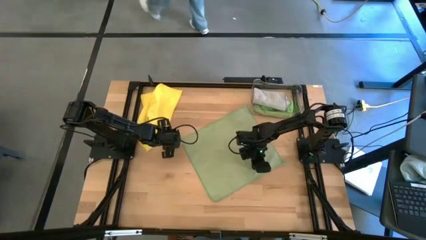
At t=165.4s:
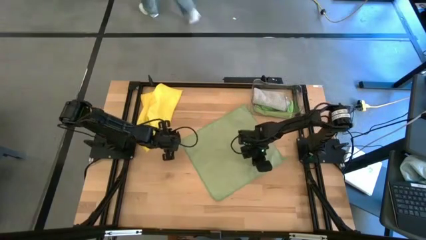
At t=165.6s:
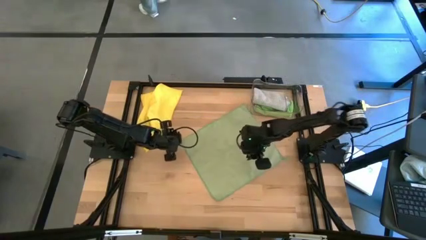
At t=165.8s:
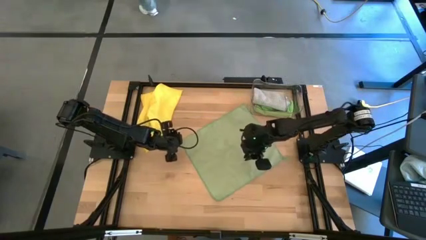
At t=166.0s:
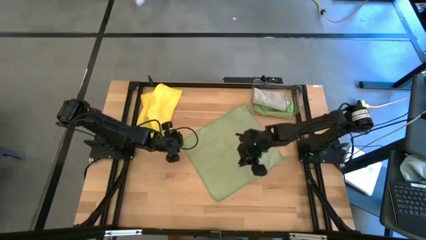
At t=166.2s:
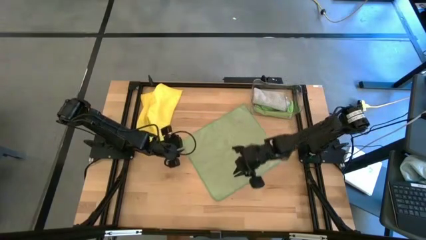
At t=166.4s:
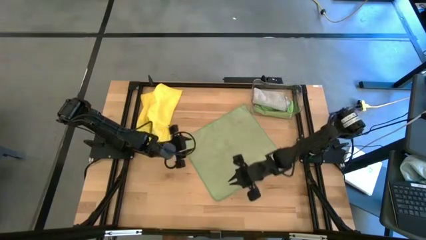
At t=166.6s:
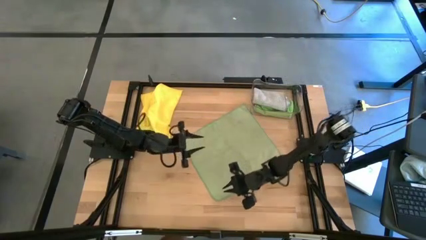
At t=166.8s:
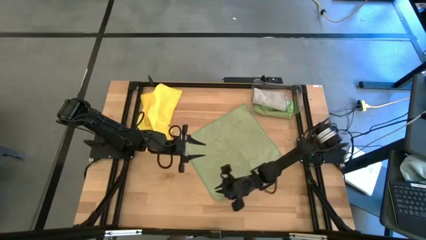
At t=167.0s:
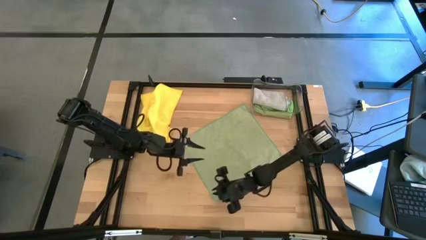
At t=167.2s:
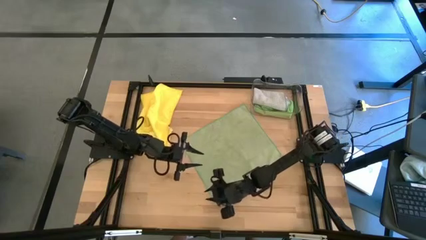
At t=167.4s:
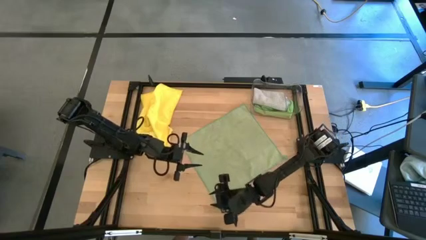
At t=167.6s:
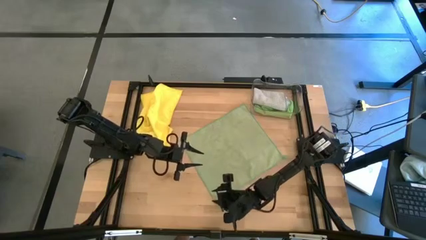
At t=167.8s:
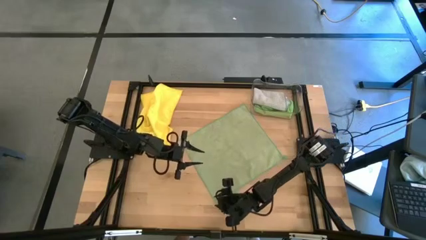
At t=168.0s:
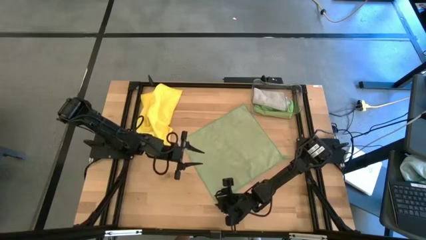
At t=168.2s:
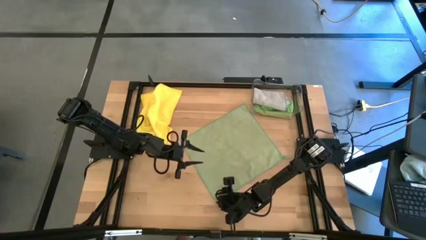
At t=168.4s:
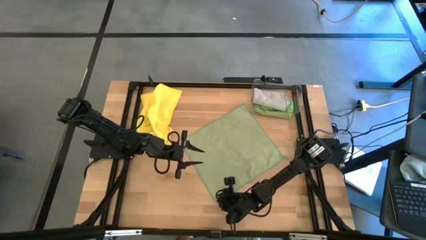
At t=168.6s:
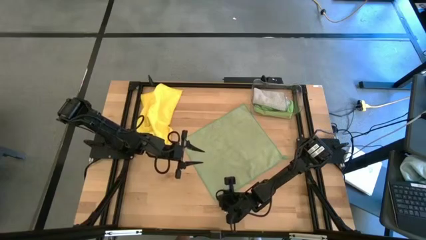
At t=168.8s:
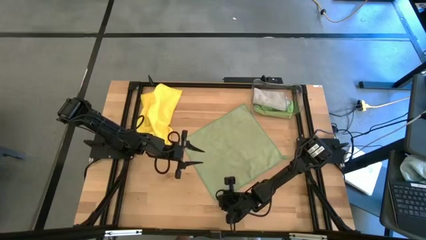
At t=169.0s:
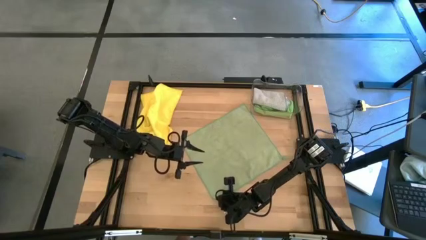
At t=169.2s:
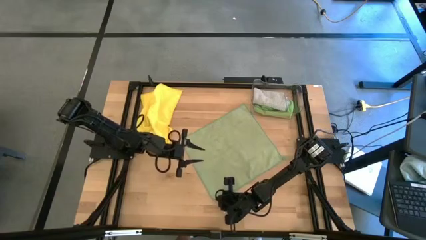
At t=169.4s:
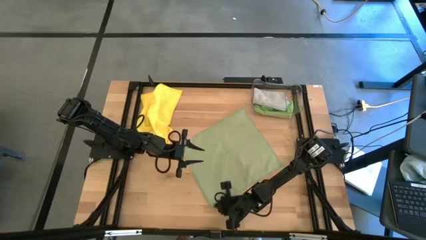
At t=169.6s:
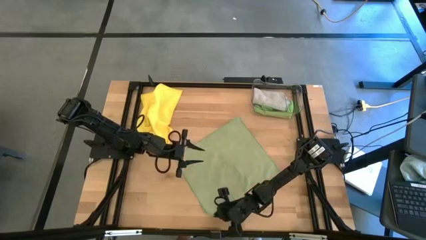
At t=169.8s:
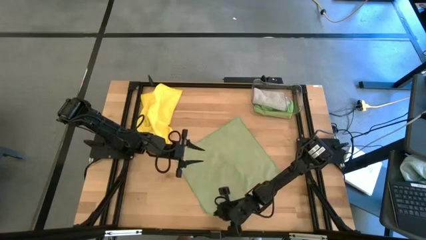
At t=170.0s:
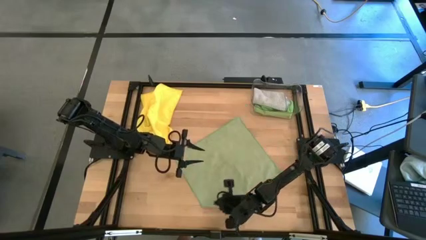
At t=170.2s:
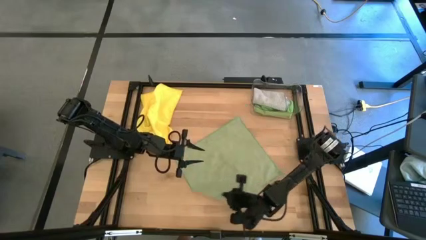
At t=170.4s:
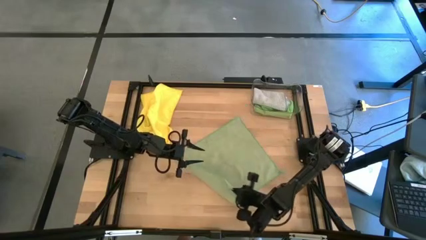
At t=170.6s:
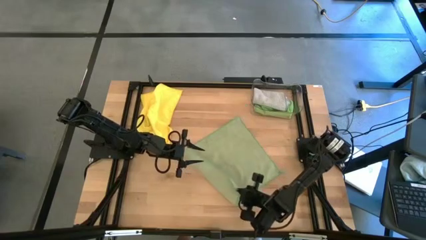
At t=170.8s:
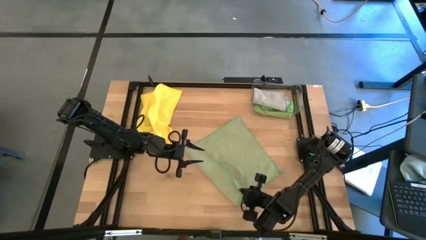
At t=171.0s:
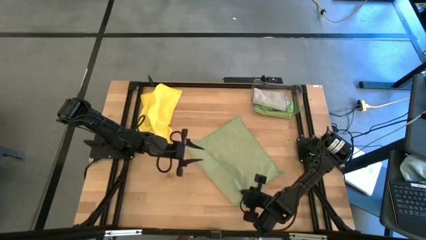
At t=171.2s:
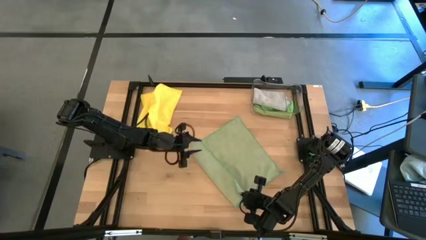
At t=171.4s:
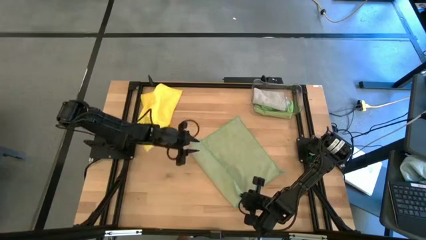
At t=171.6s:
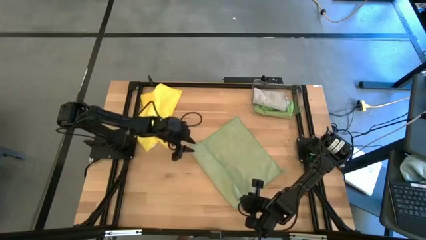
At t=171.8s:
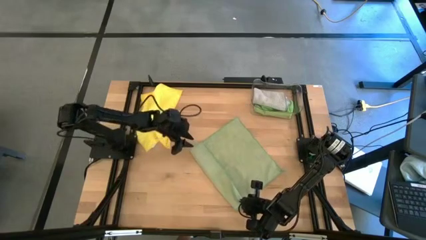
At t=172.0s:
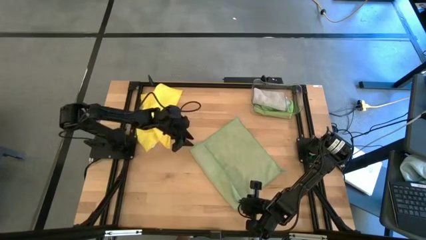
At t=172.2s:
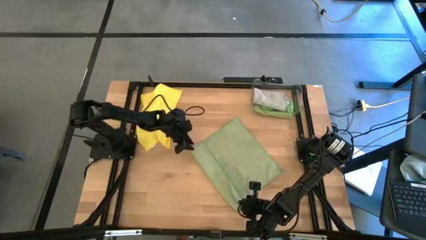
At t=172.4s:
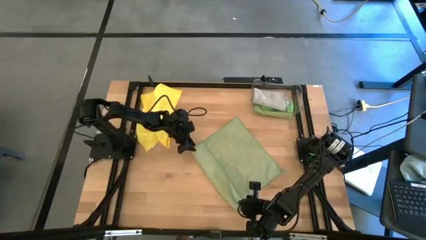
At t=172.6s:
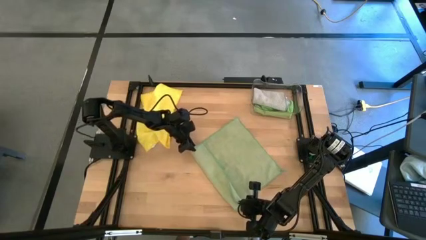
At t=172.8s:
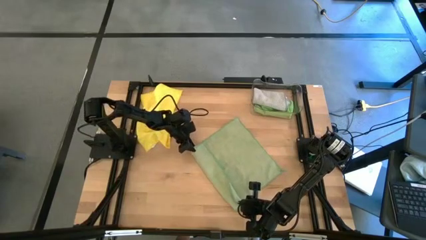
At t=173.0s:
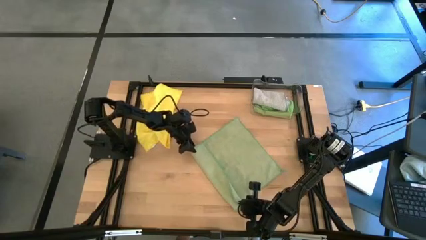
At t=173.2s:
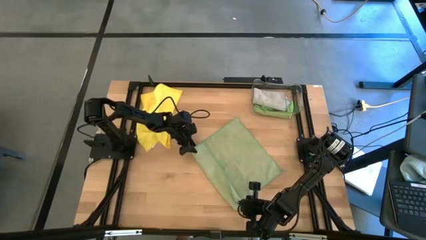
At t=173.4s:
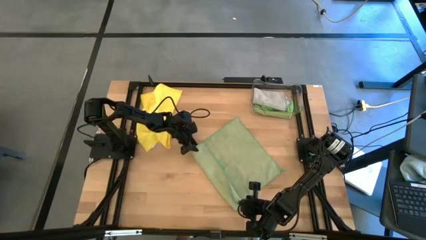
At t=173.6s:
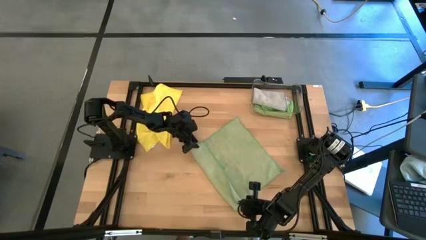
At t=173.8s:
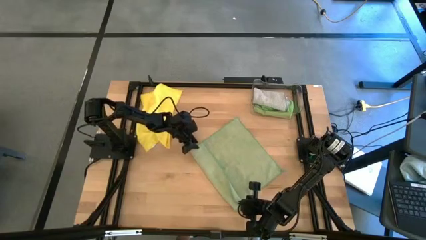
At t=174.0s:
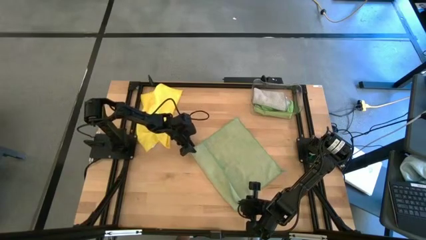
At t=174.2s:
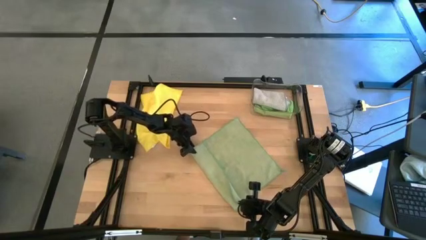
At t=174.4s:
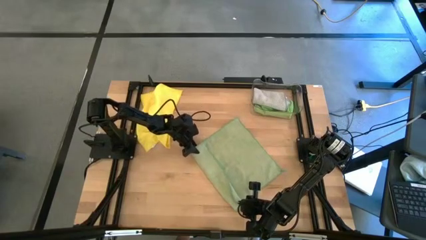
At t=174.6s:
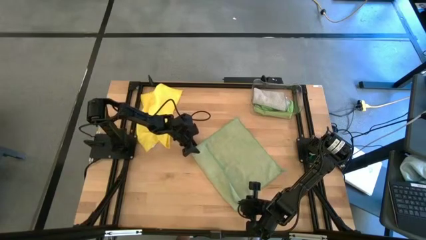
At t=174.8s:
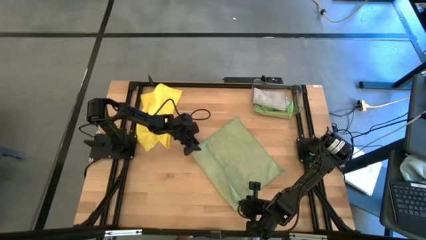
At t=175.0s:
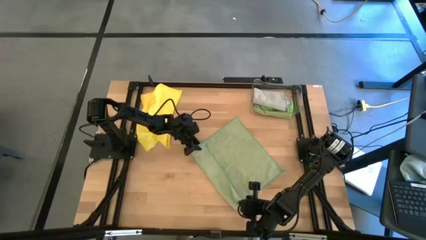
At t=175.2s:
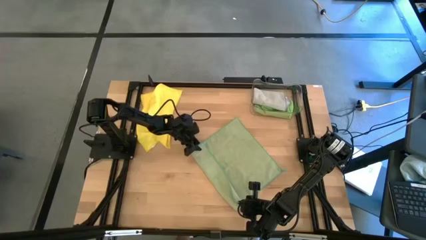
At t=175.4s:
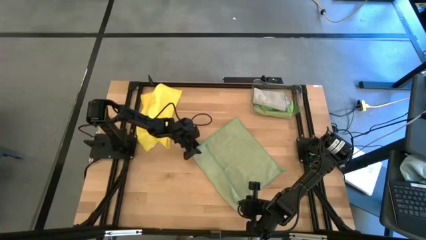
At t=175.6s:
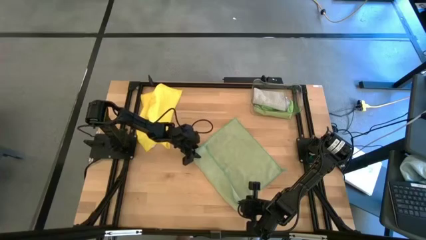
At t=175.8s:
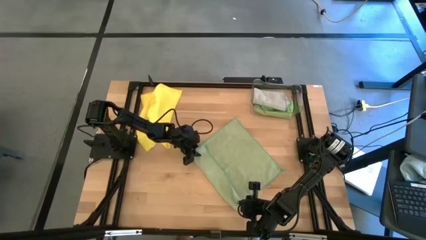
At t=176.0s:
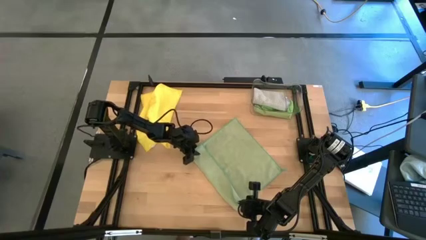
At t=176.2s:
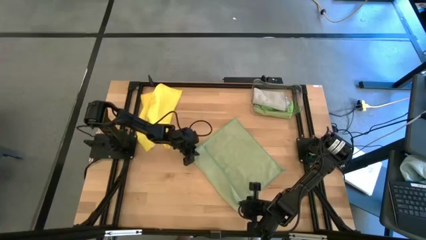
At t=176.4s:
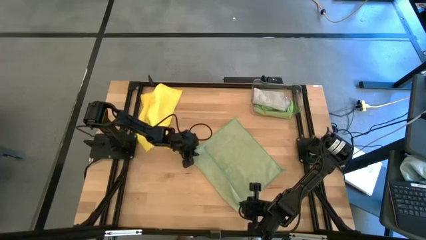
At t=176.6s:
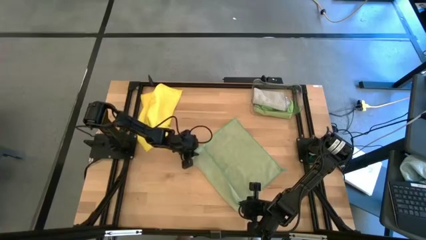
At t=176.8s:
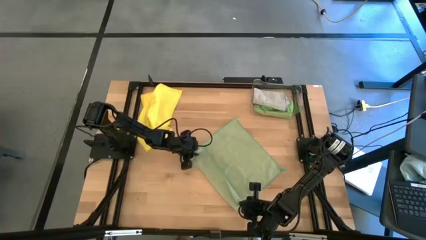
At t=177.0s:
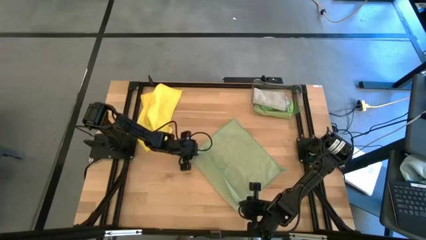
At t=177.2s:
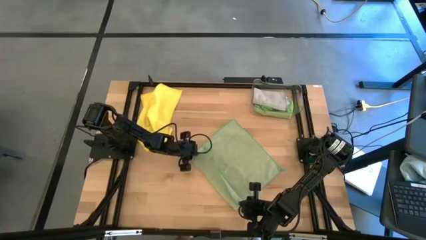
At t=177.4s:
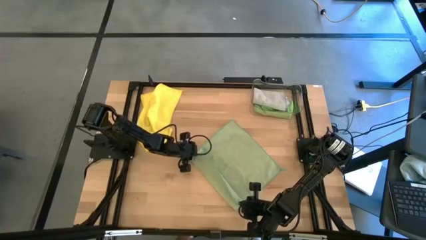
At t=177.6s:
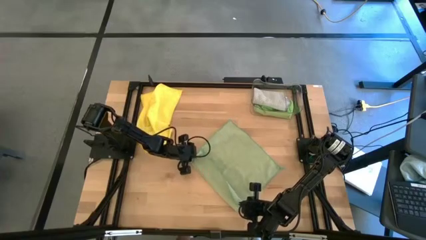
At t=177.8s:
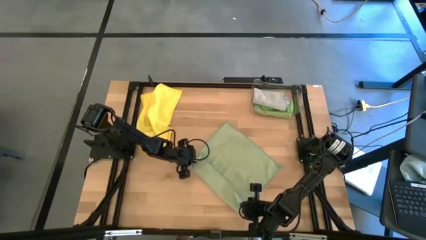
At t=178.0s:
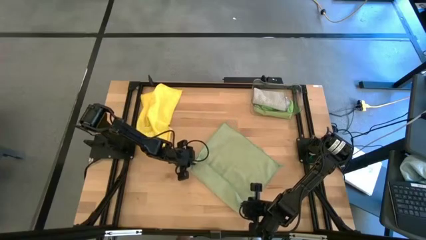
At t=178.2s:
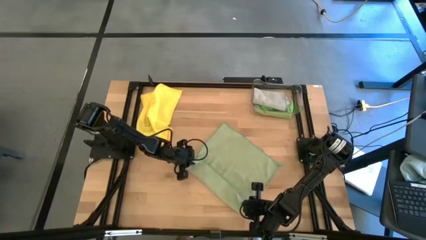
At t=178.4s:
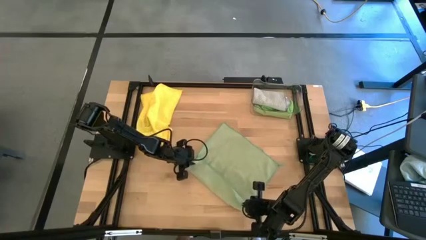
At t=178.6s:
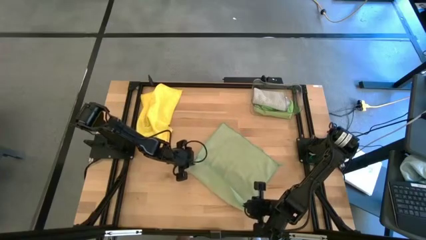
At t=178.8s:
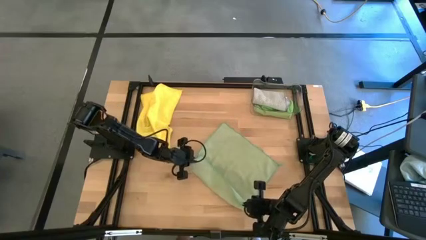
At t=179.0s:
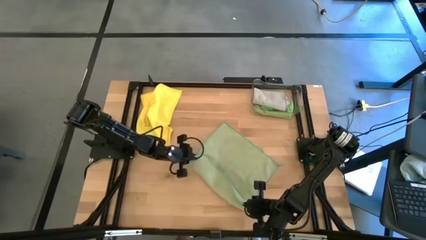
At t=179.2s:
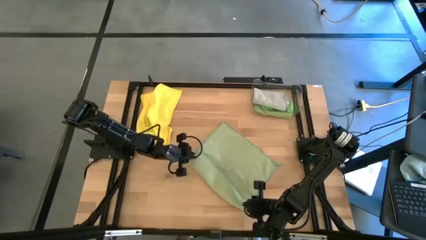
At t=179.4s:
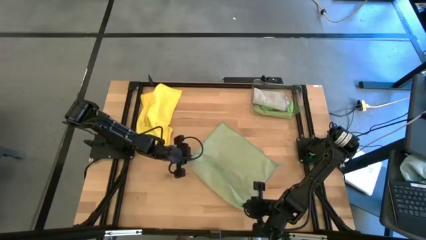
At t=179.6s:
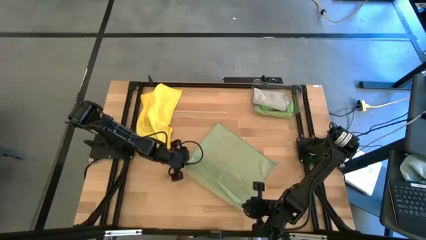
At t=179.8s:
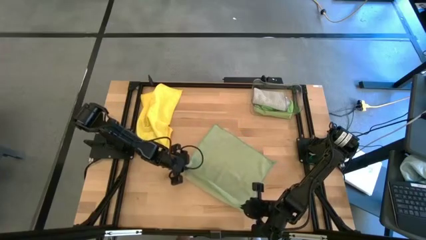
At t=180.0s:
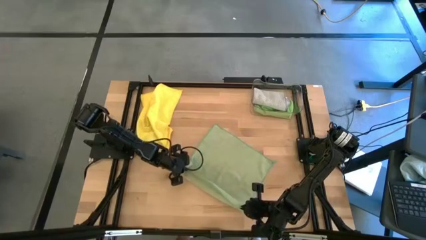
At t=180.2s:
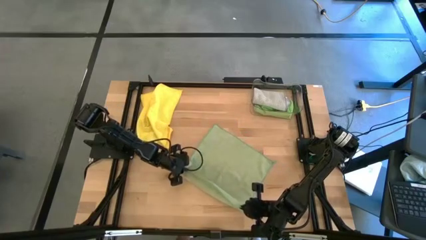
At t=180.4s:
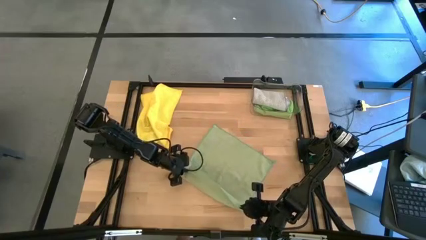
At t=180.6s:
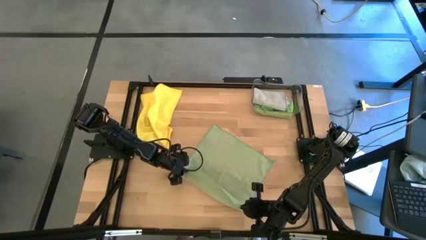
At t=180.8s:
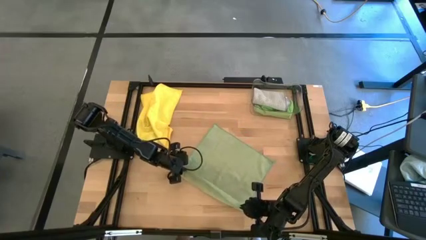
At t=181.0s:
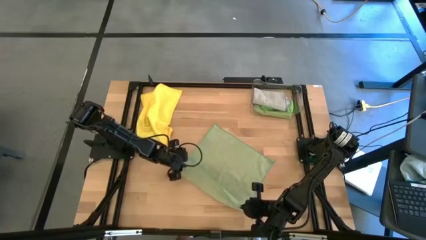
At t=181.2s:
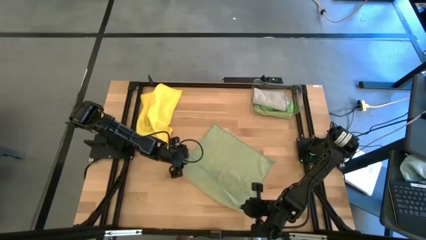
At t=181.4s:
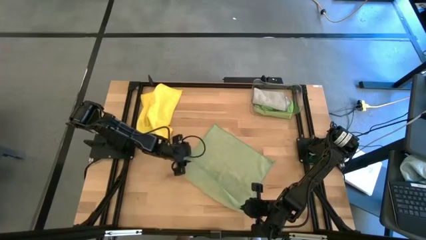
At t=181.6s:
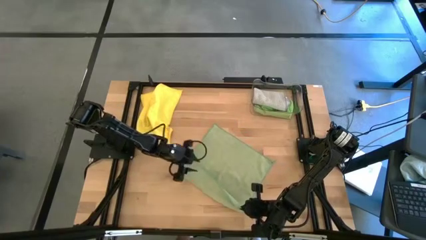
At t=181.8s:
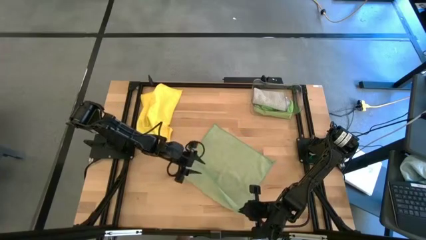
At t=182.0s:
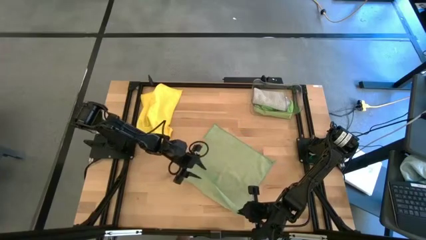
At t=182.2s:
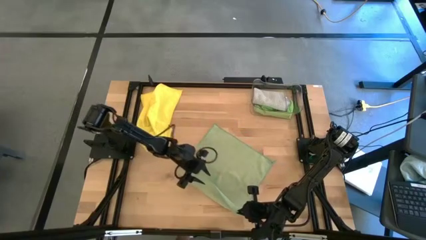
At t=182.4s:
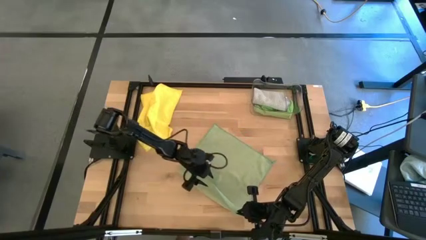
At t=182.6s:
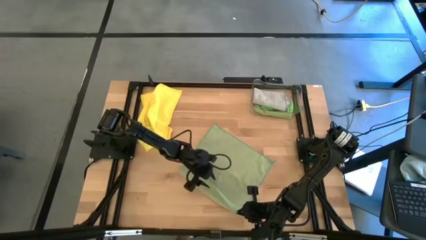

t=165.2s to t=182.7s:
Task: Fold microfiber towels
Fold the light green cloth
